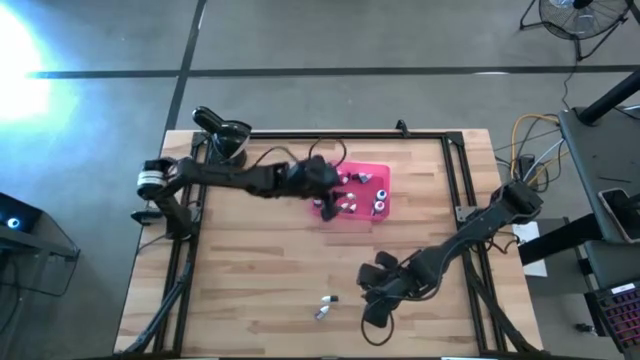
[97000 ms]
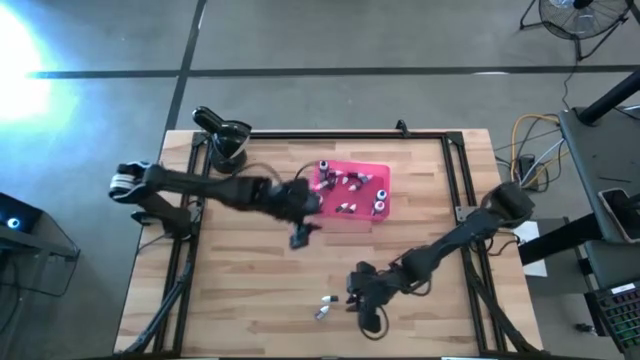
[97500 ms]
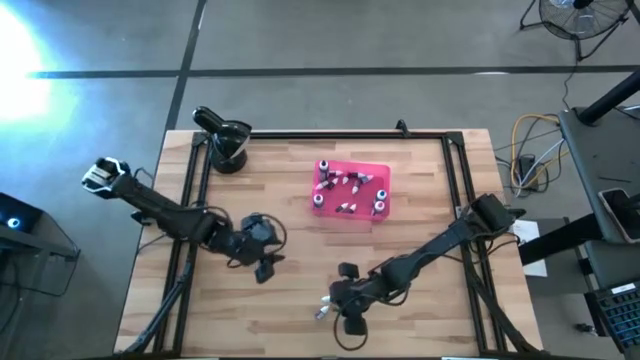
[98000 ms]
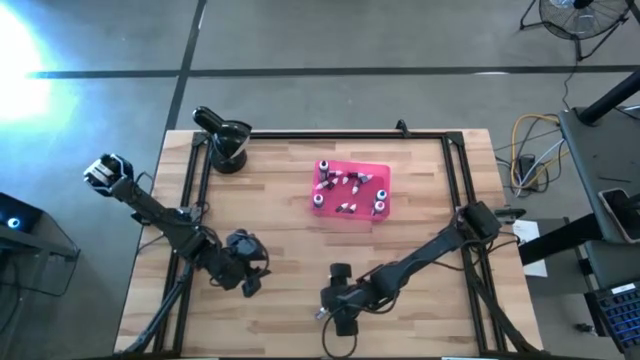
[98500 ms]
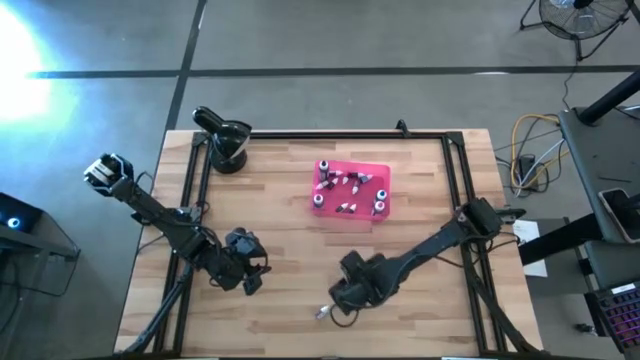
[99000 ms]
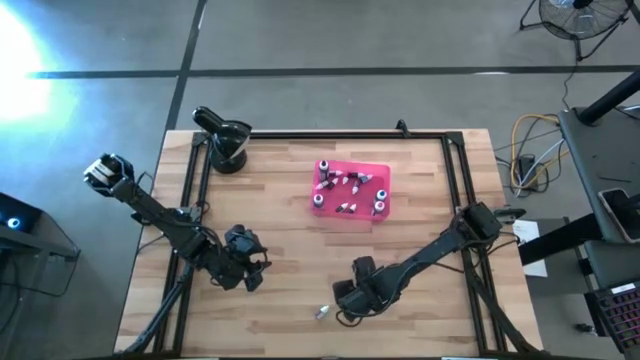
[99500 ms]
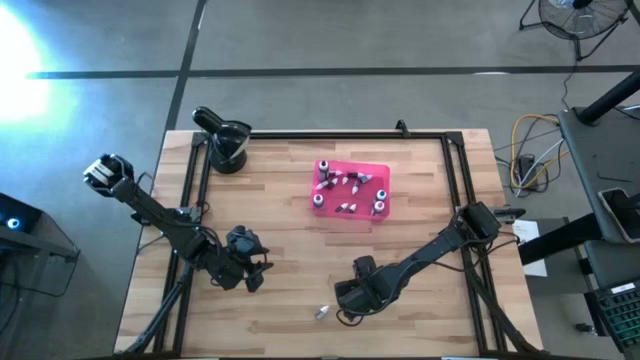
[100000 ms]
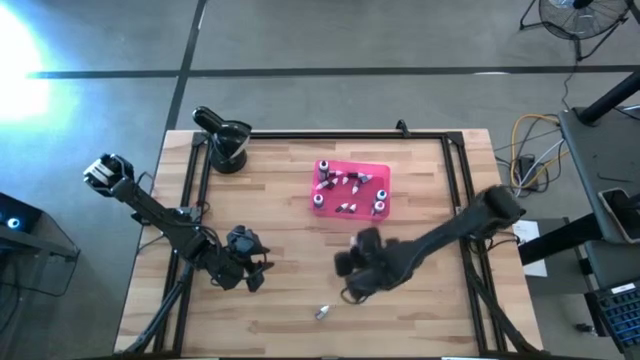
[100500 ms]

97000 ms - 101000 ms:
Task: Pick & Place food coloring
Put the small brown food coloring into the pink bin

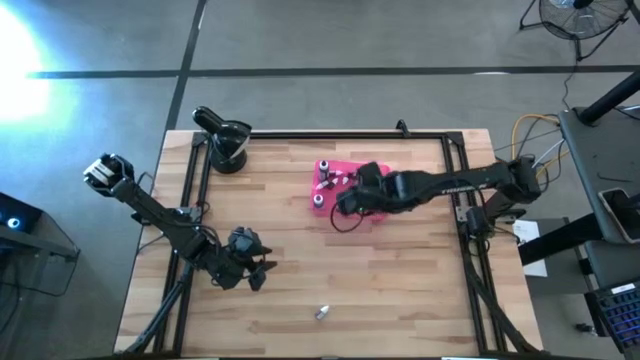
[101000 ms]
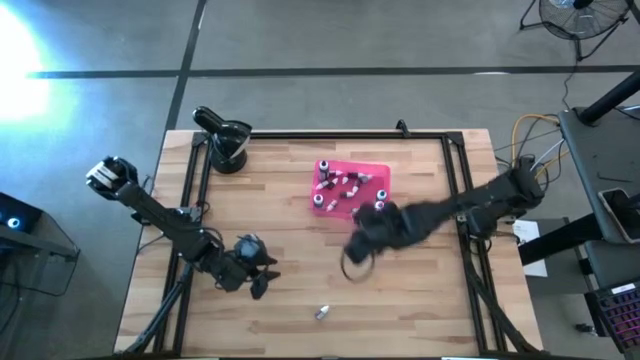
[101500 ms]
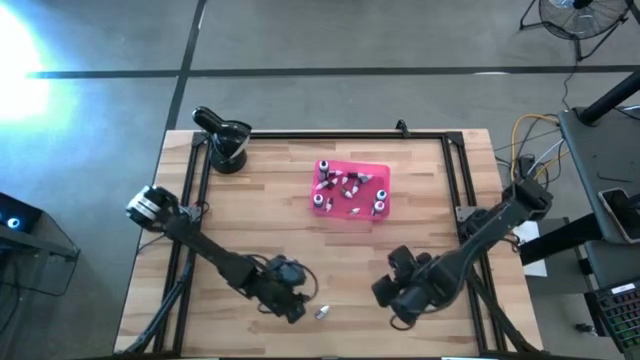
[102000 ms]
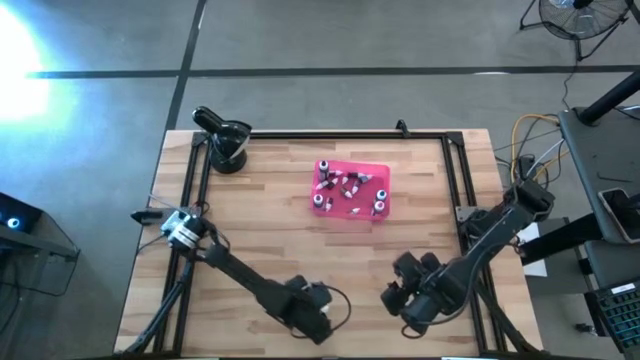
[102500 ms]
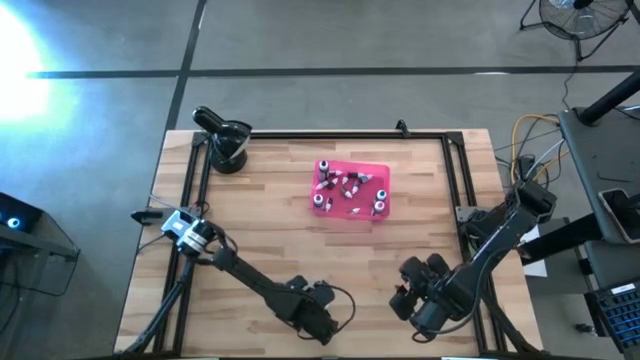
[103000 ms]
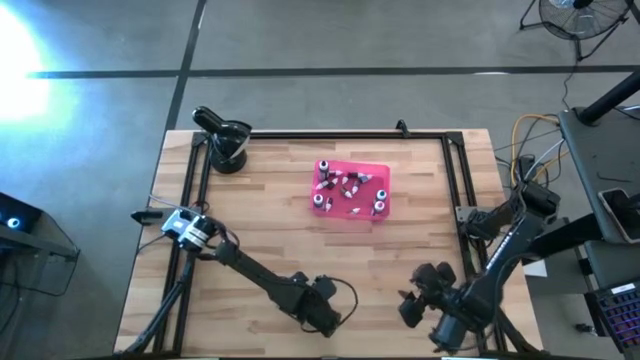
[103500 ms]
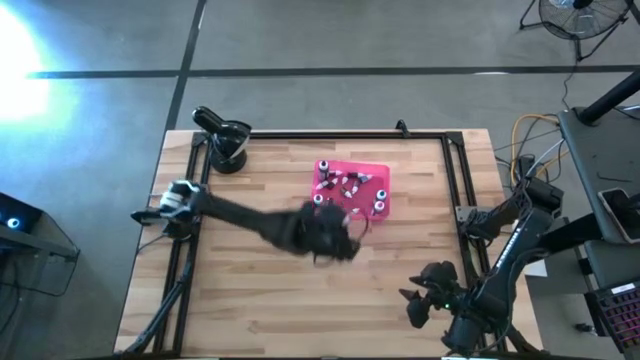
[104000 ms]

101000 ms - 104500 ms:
Put the small purple food coloring bottle into the pink bin

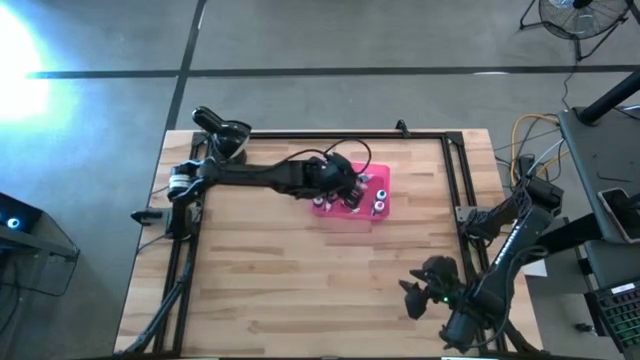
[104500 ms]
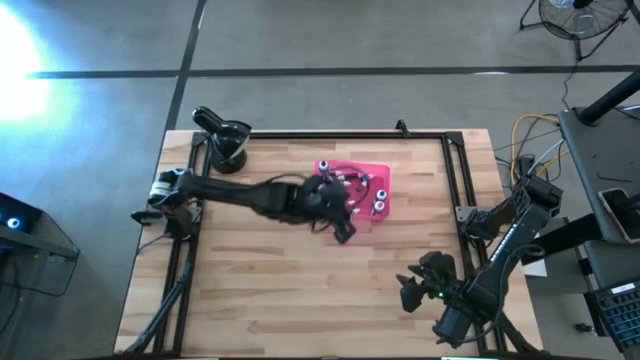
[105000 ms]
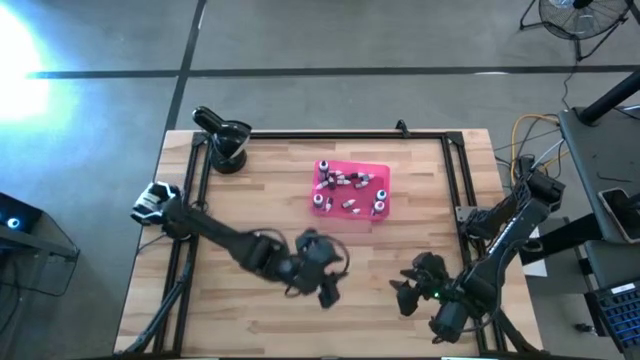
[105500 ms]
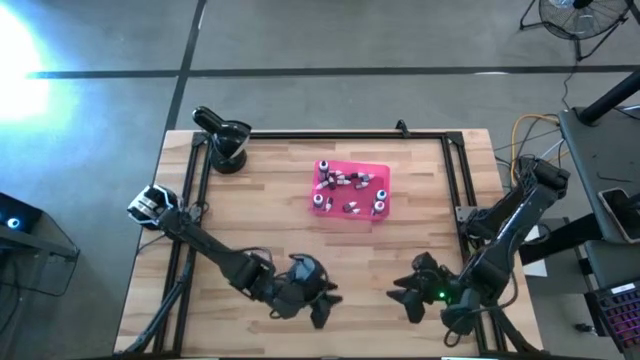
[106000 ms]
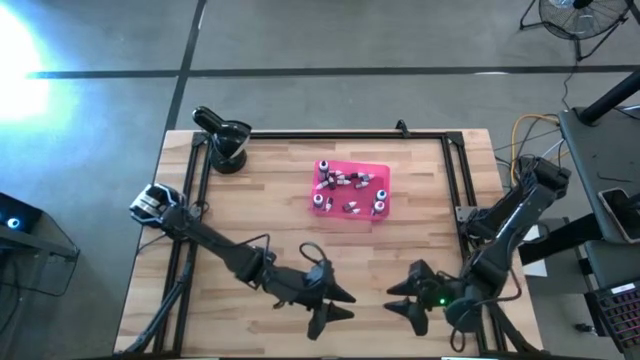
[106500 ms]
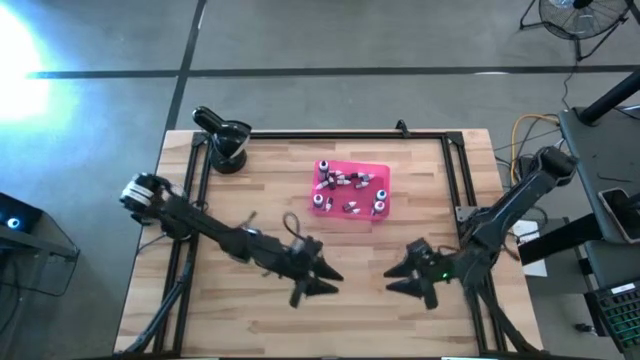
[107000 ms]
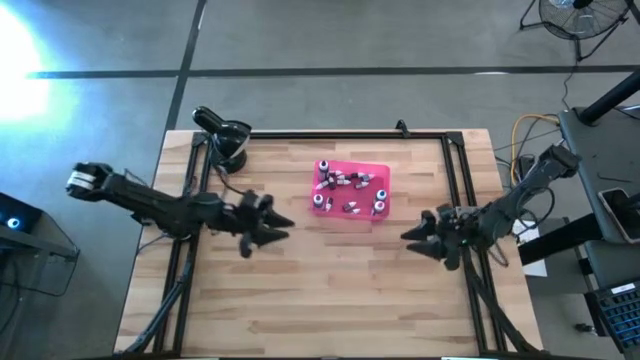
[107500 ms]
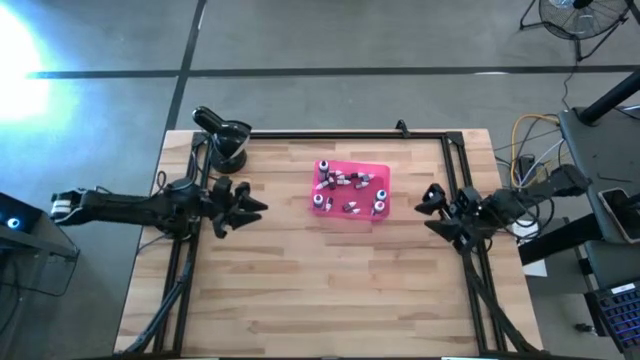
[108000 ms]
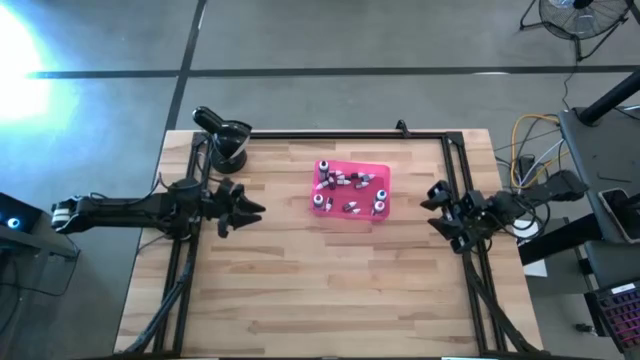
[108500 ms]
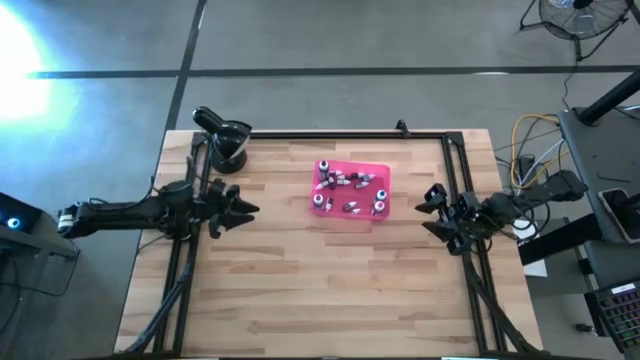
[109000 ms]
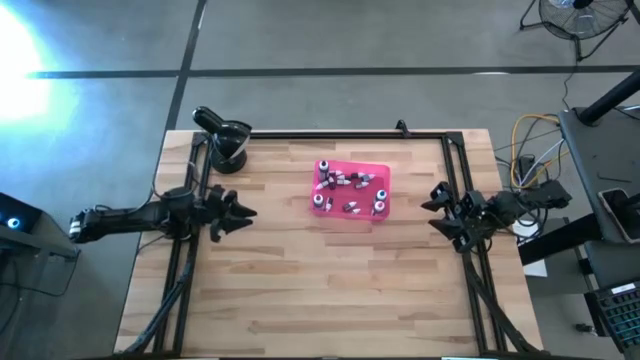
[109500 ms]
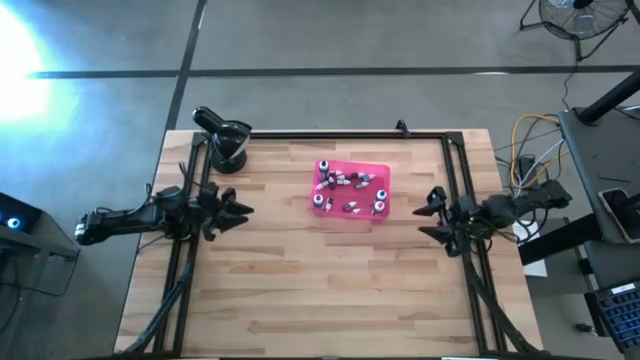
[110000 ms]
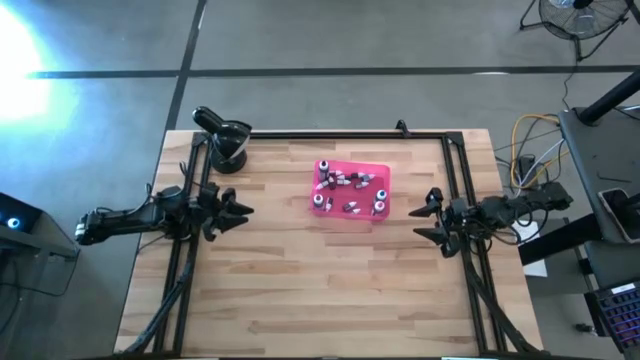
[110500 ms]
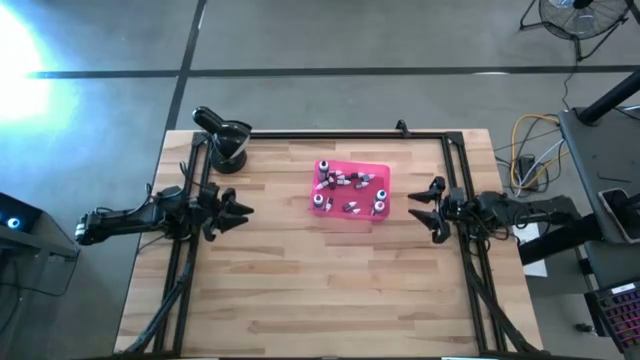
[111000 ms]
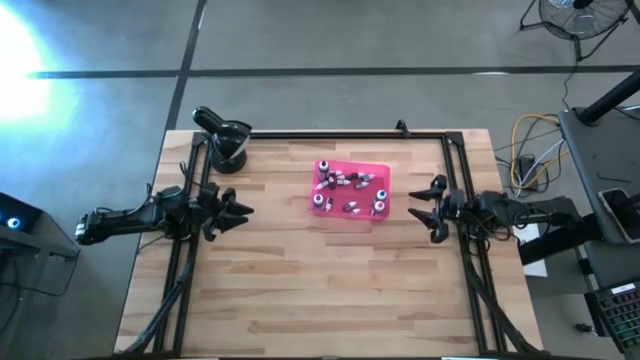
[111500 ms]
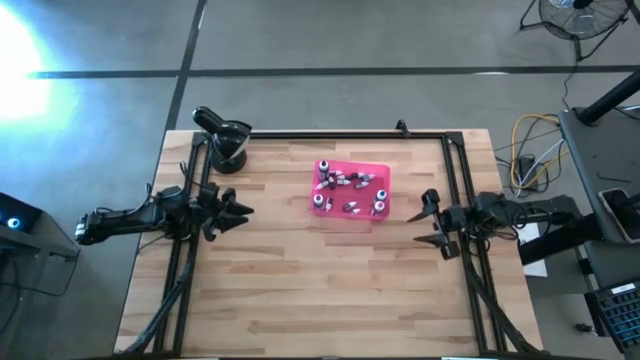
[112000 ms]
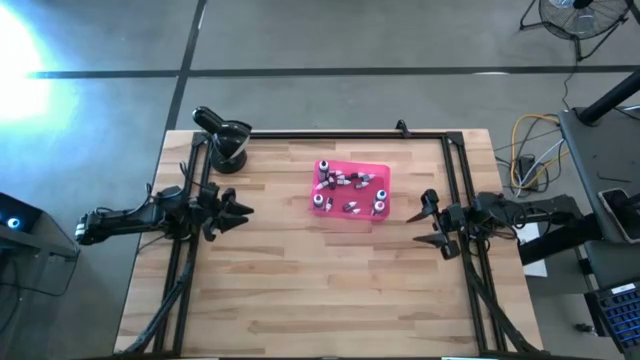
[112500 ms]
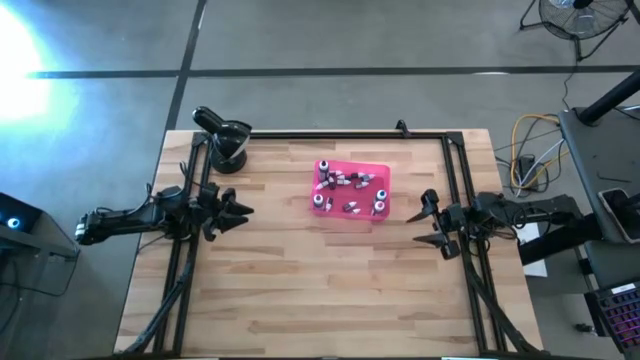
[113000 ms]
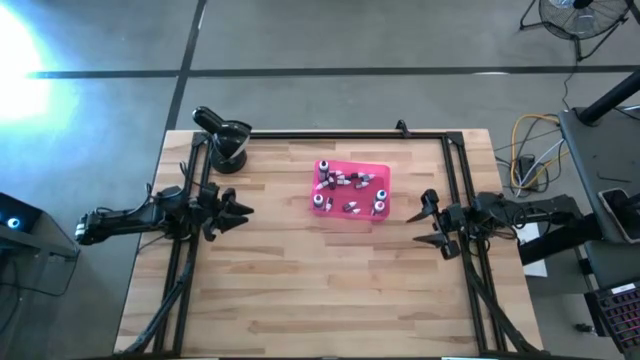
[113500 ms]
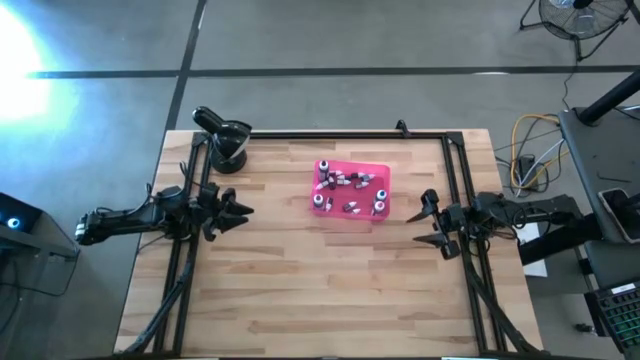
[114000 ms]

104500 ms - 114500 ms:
Return to Home Position

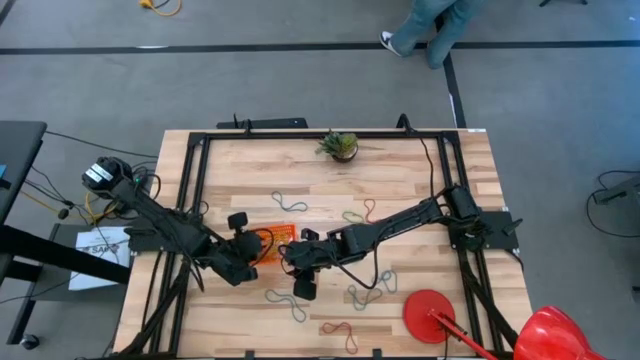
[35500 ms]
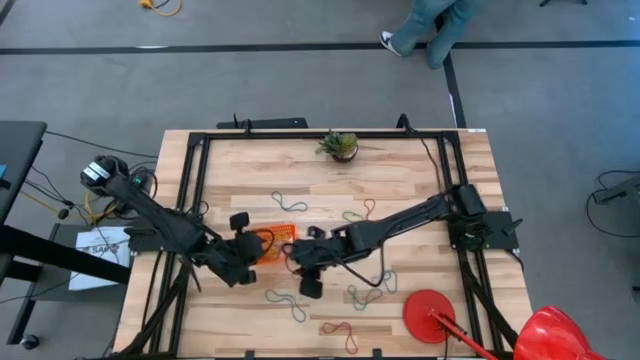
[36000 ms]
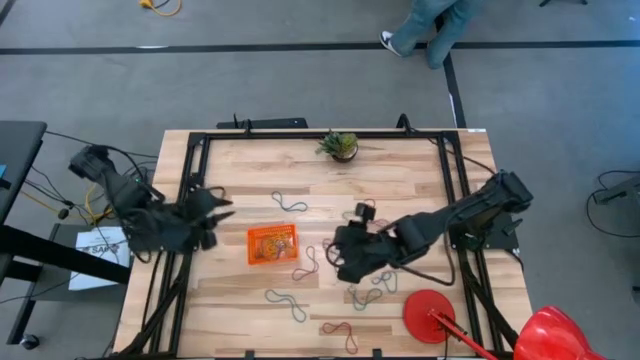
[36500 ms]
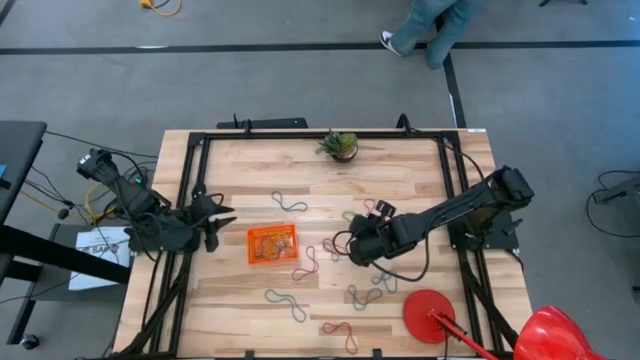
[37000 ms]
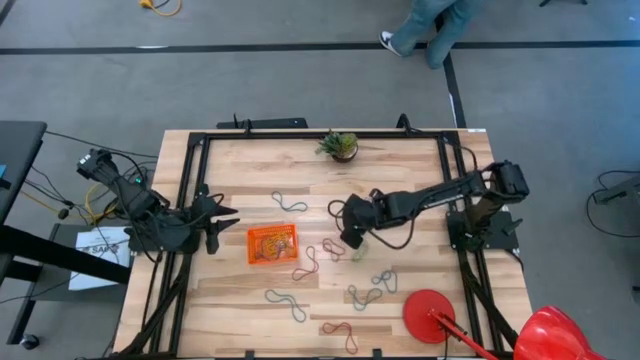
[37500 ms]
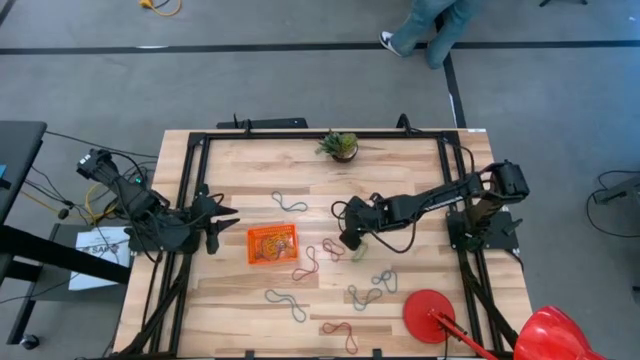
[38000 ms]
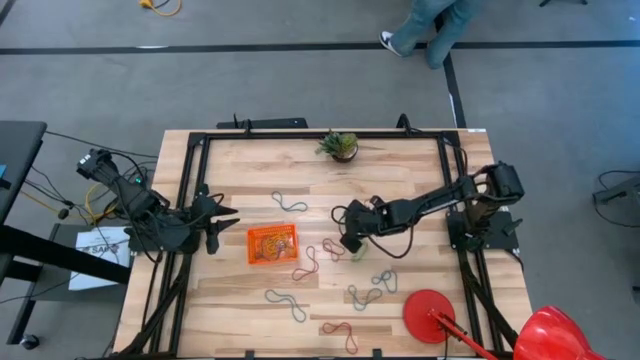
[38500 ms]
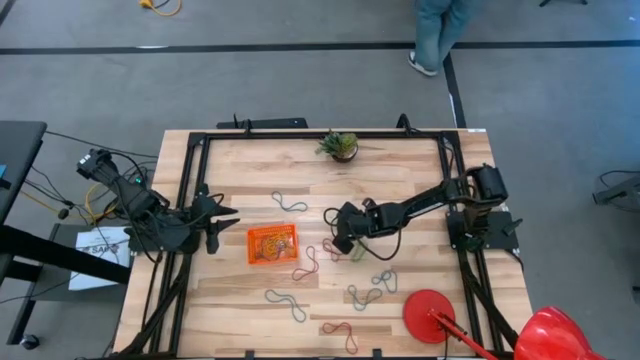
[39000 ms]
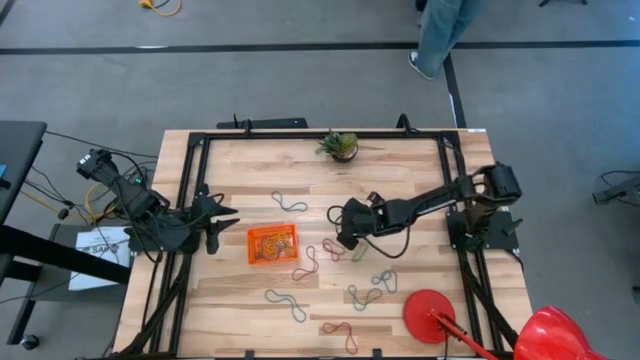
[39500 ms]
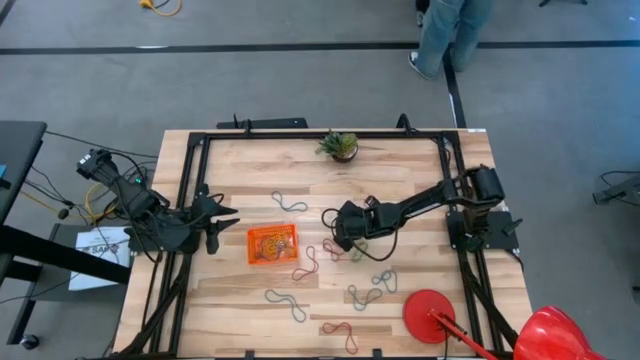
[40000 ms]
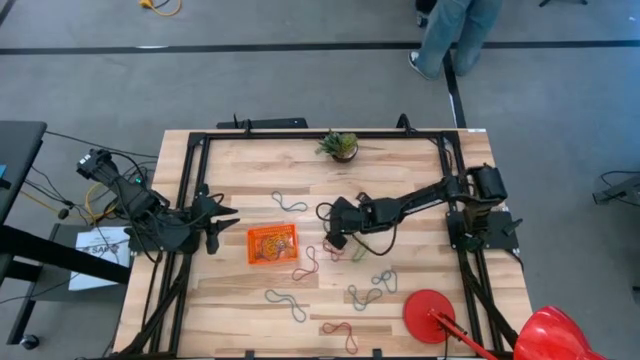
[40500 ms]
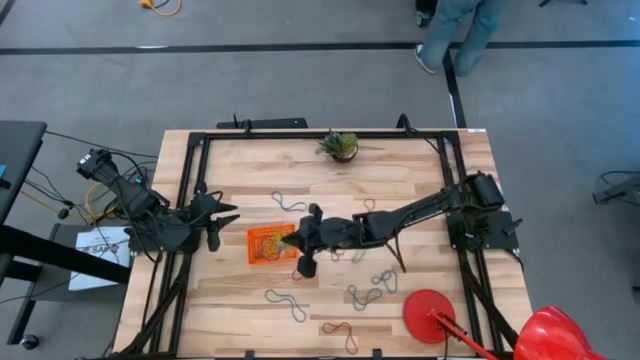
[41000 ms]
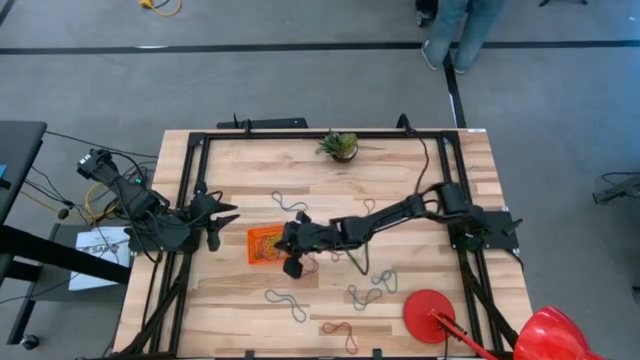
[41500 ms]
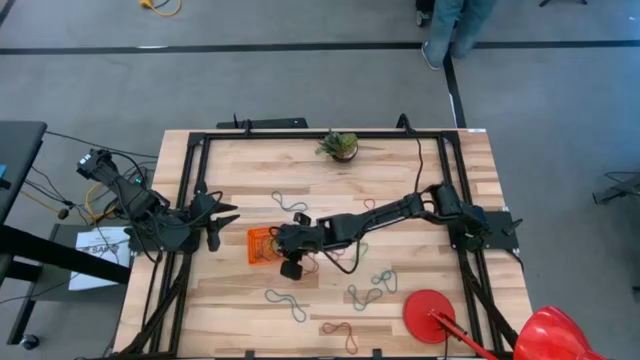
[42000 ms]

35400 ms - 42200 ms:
Task: Pick and place rubber bands into bin
Put the top green rubber band into the orange container
